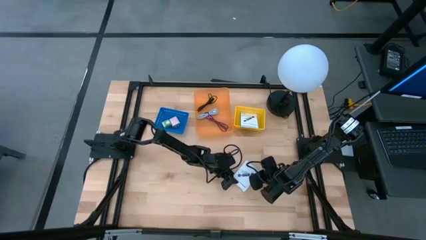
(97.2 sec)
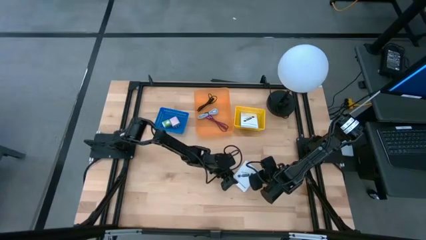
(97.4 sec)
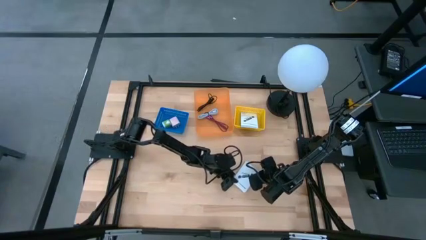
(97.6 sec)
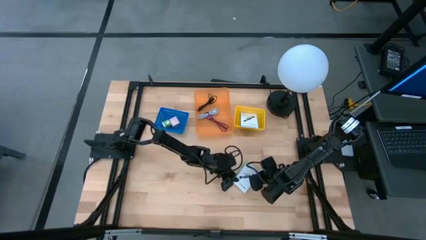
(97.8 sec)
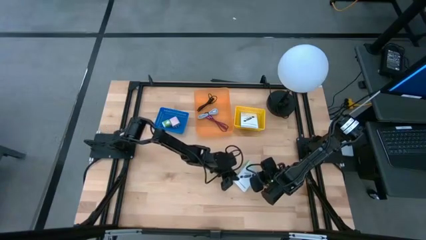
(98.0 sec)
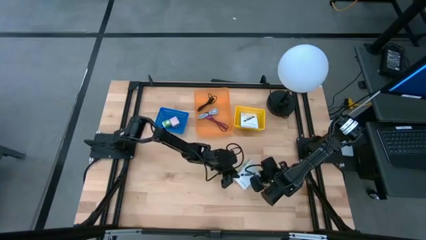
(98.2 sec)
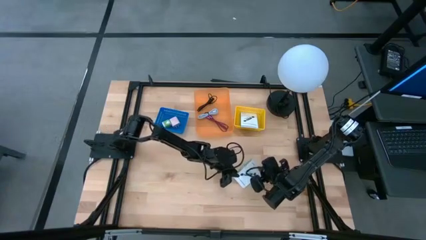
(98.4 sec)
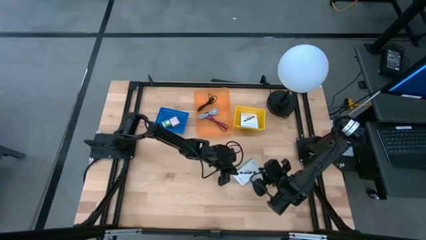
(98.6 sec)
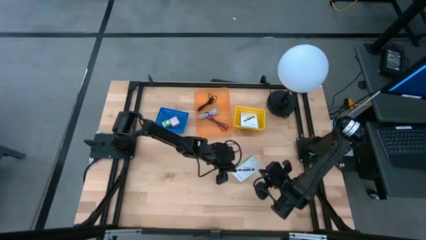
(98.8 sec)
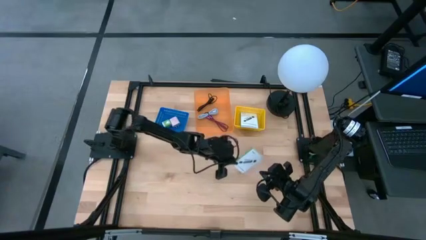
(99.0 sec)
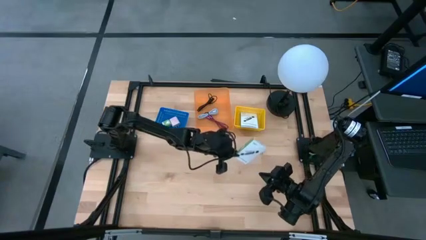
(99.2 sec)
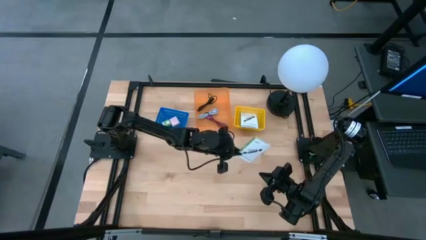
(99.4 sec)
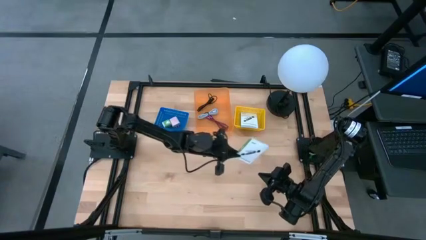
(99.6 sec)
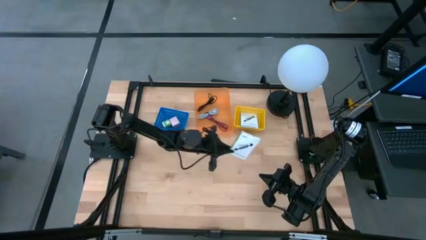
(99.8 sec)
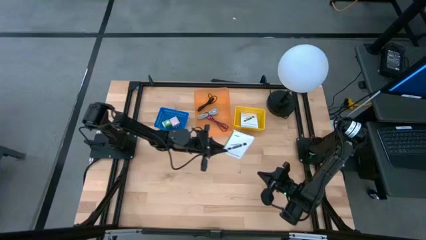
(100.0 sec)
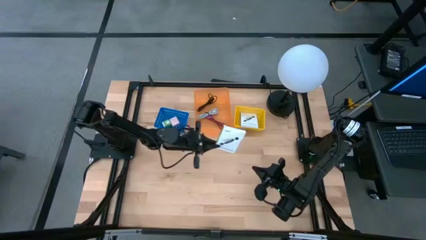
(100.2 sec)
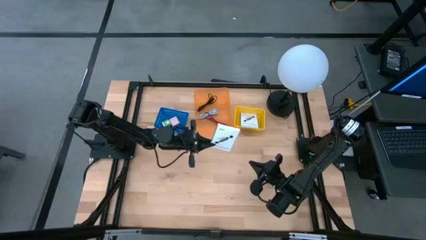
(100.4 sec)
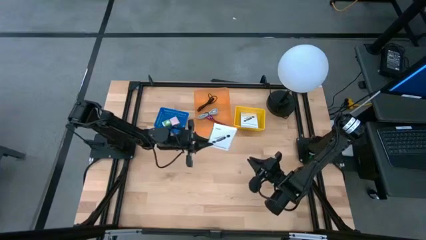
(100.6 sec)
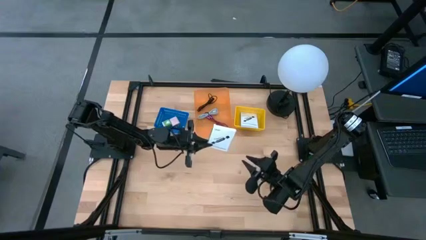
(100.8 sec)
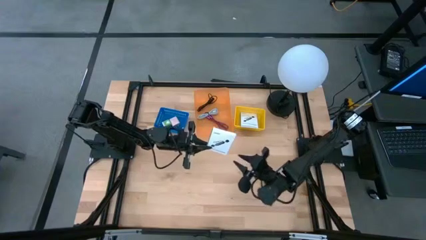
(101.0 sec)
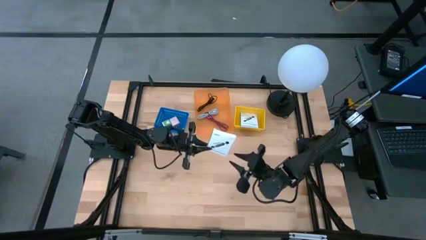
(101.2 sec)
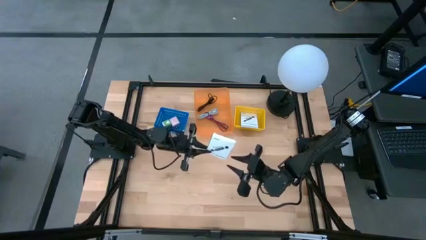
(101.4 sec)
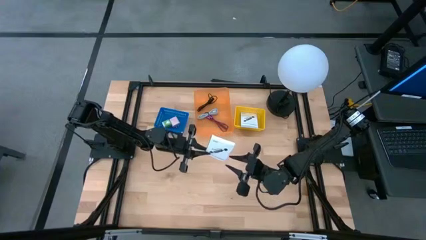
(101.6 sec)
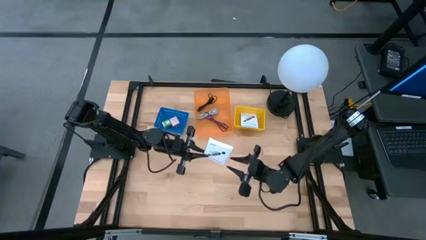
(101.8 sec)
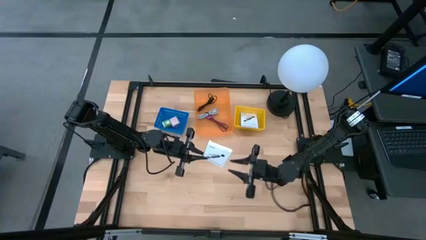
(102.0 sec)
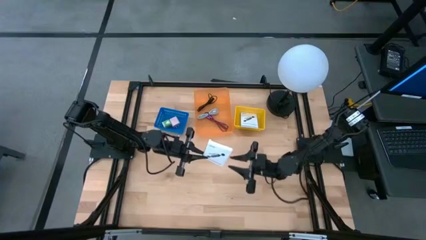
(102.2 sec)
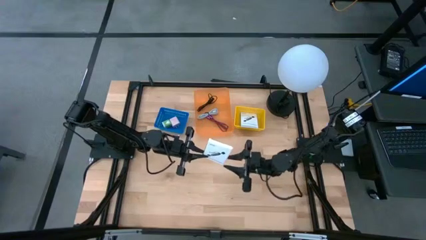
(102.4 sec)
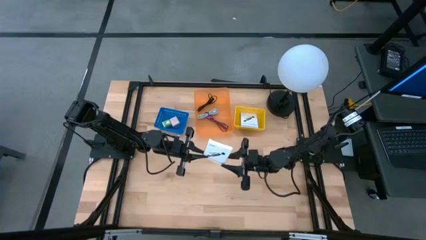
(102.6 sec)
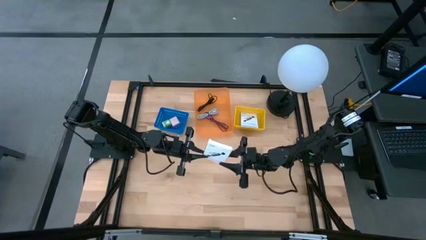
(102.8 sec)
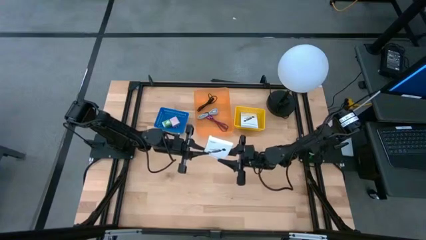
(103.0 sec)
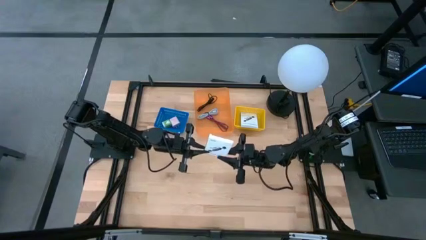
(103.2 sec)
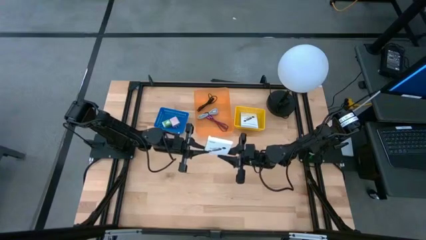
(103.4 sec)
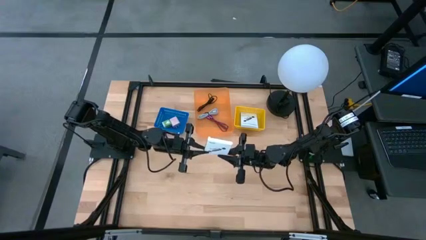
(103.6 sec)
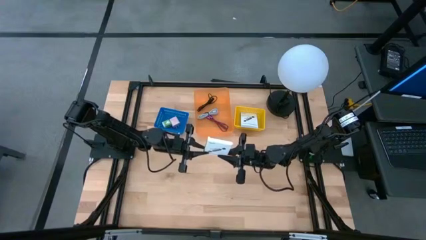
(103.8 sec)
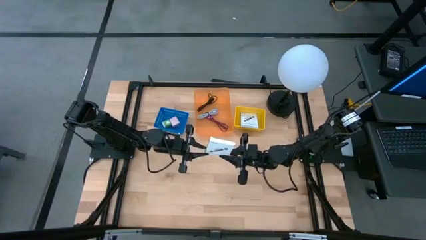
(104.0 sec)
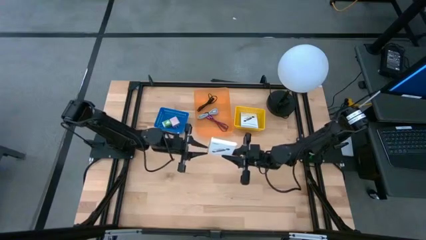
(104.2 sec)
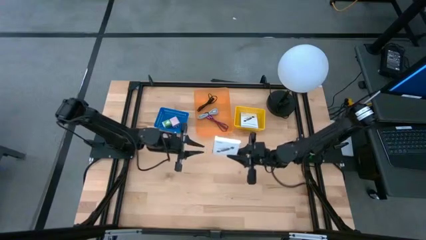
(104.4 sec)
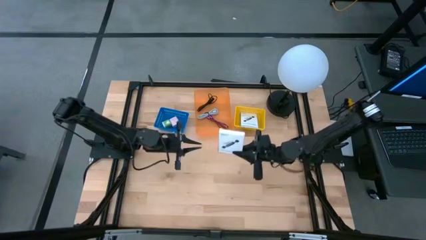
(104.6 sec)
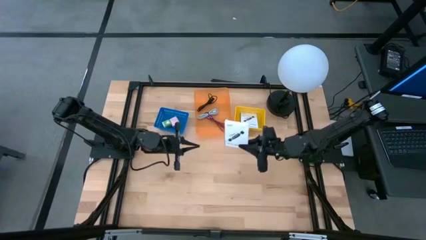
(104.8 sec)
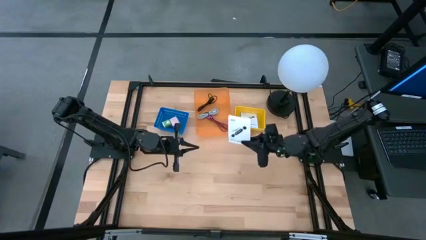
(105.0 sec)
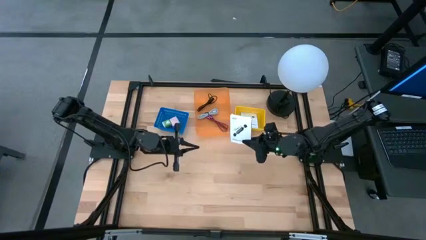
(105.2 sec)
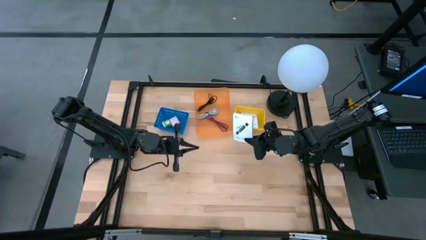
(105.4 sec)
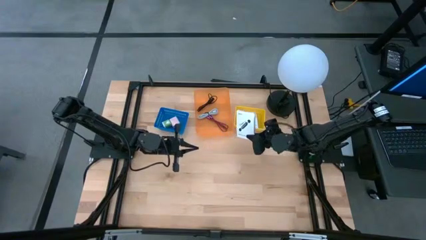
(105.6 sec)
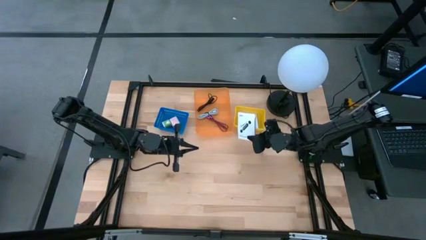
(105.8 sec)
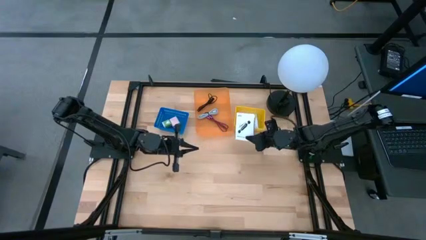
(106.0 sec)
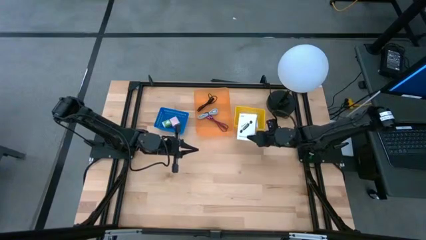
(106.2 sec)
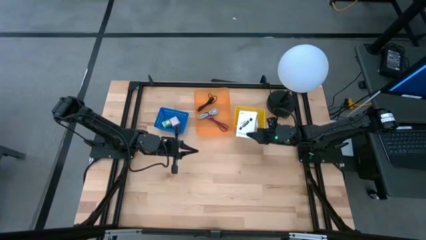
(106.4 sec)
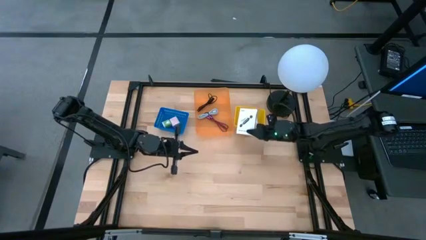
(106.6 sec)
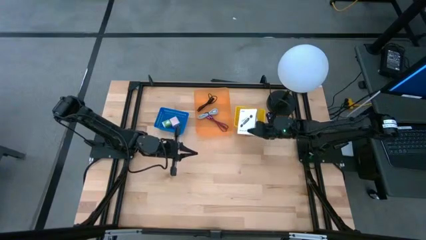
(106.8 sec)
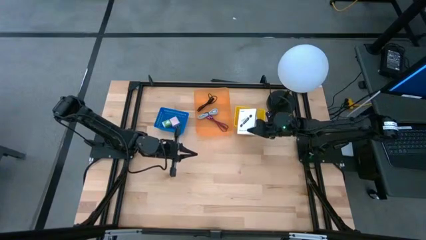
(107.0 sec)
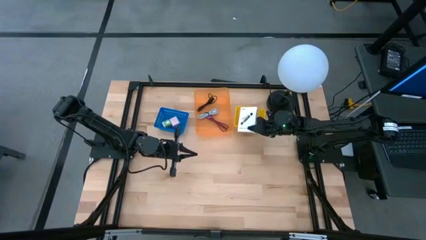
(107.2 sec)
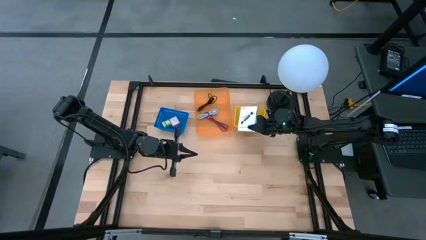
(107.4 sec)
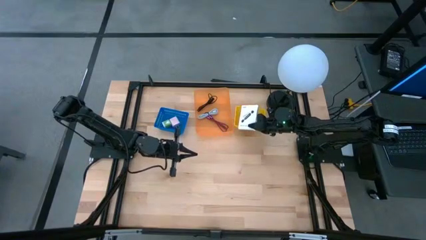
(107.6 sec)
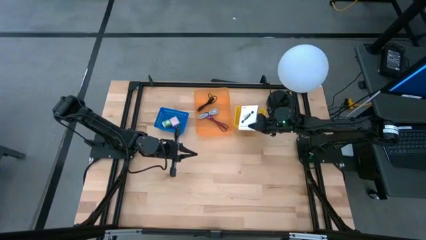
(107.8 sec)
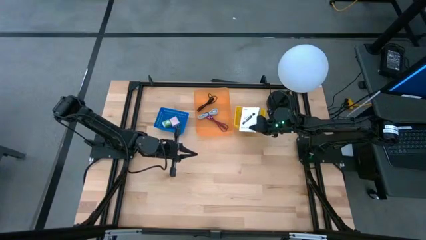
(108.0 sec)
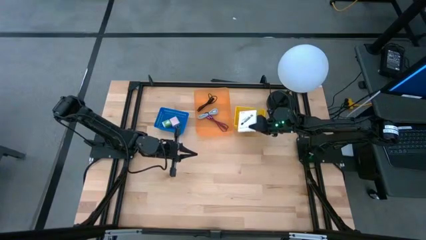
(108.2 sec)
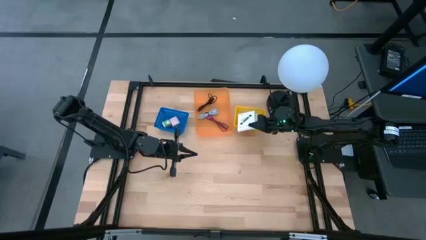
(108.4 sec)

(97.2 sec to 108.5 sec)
Task: Pick and place items into bin
Put the white USB box into the yellow bin
